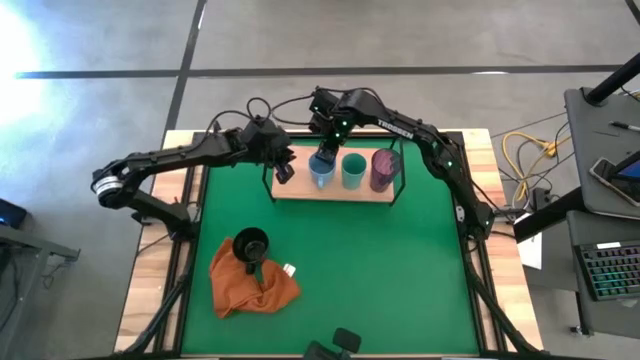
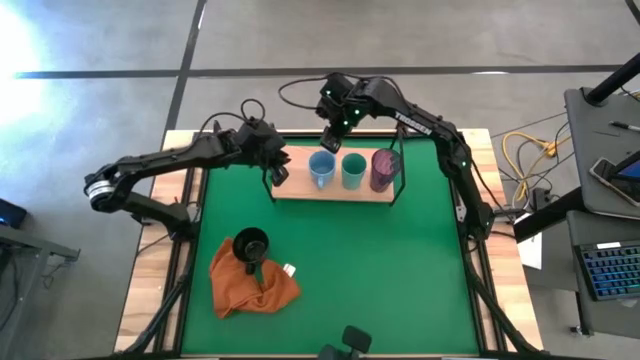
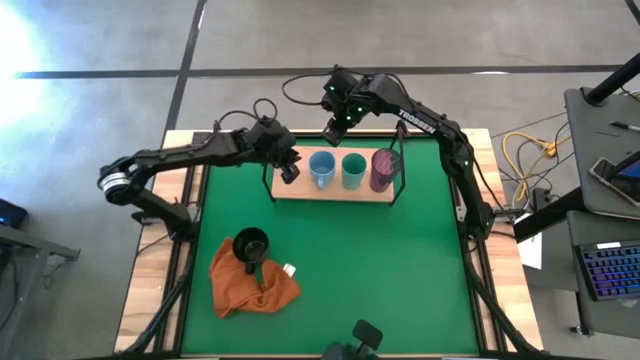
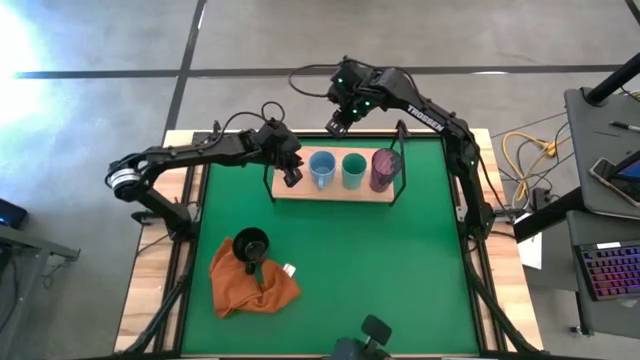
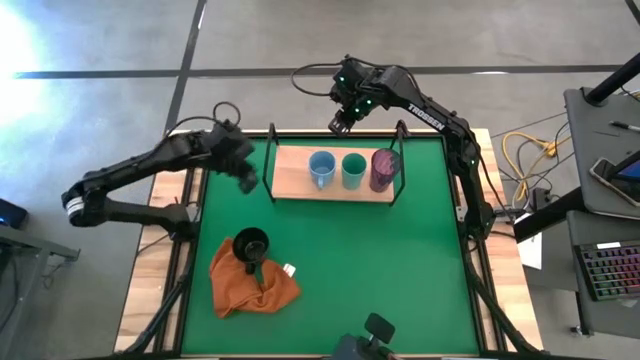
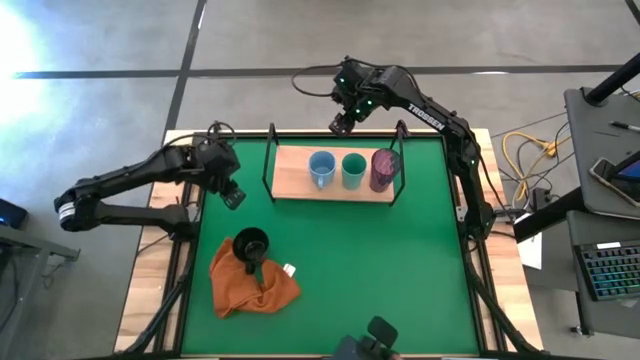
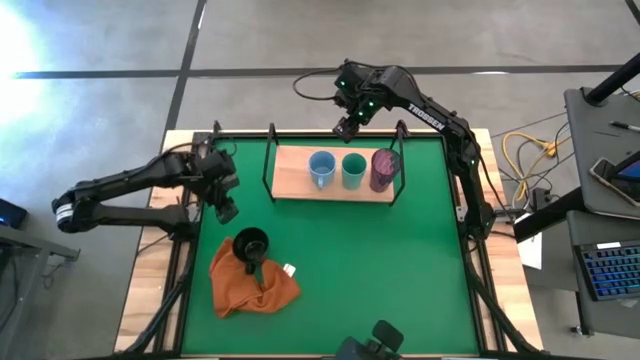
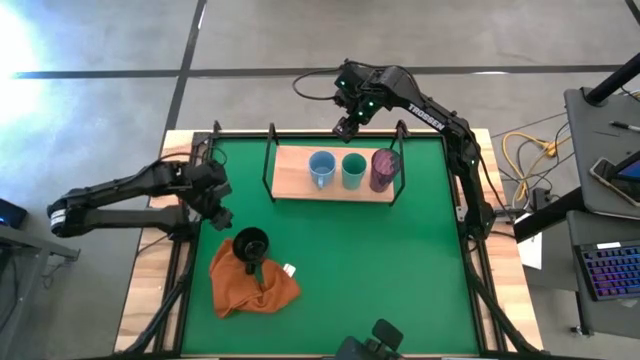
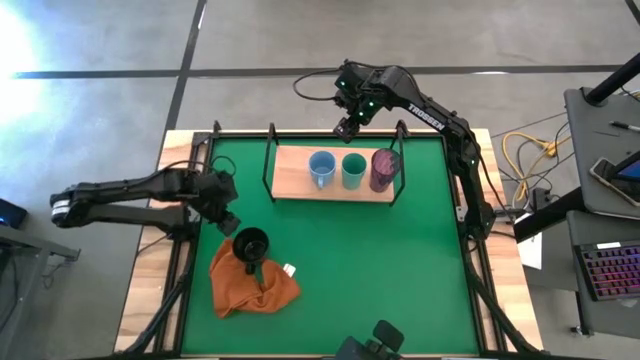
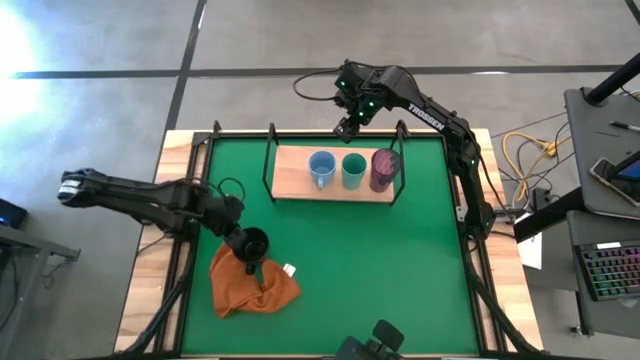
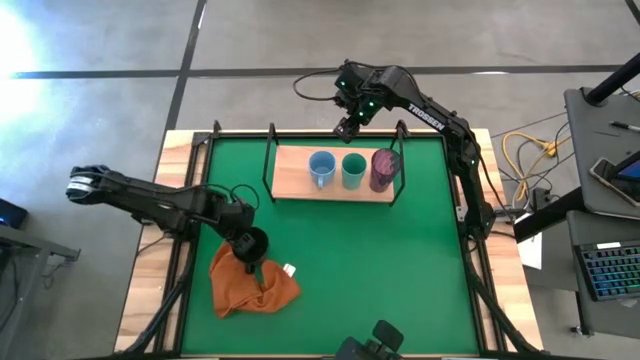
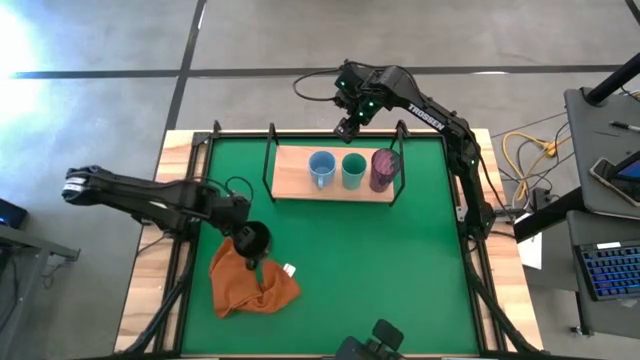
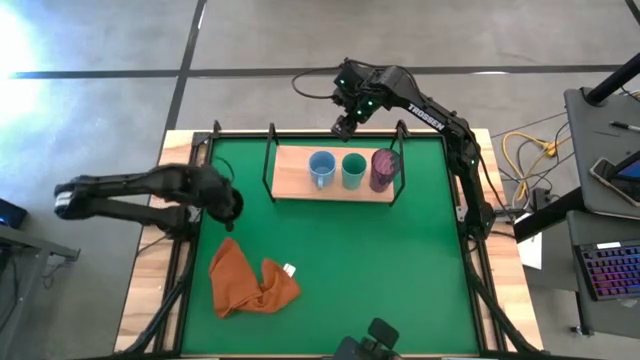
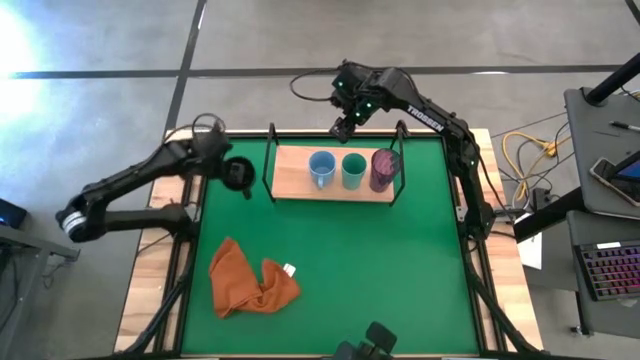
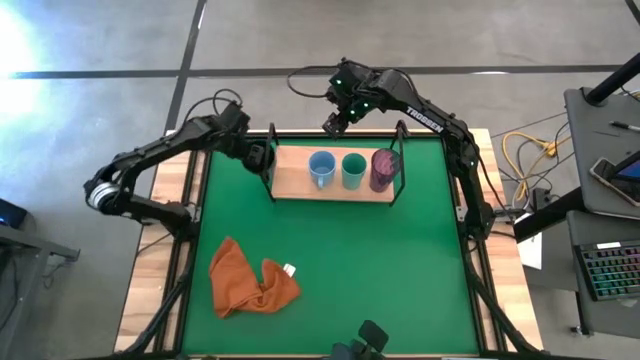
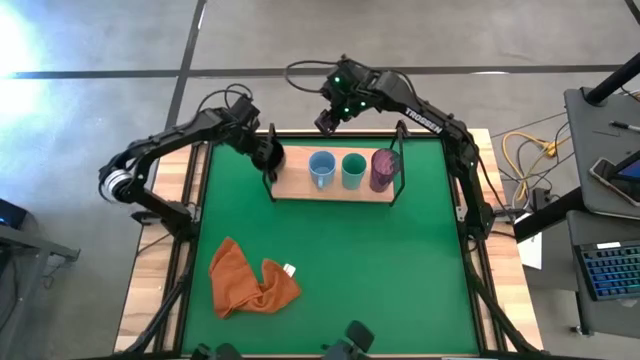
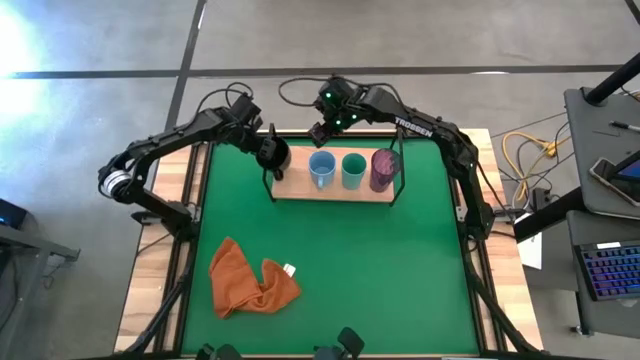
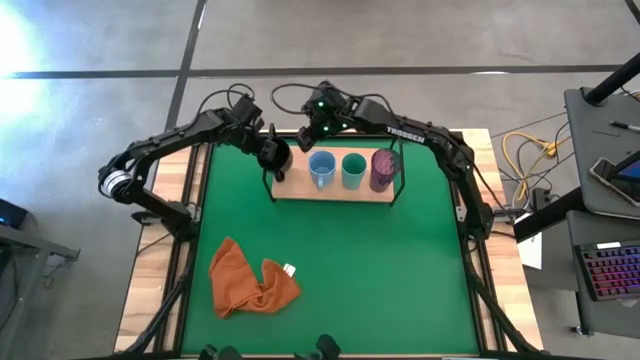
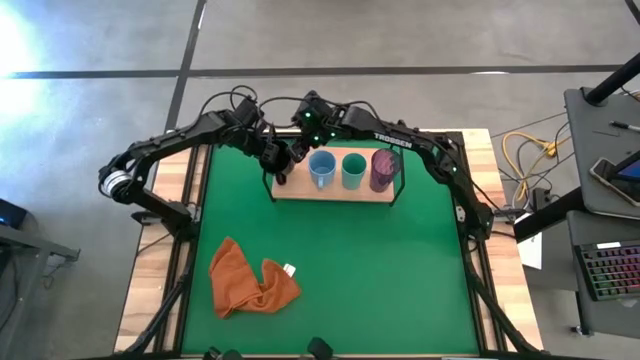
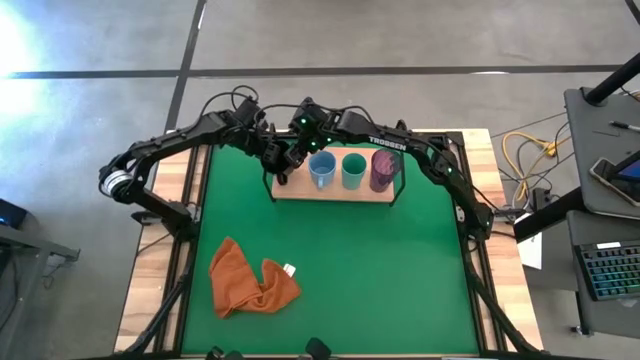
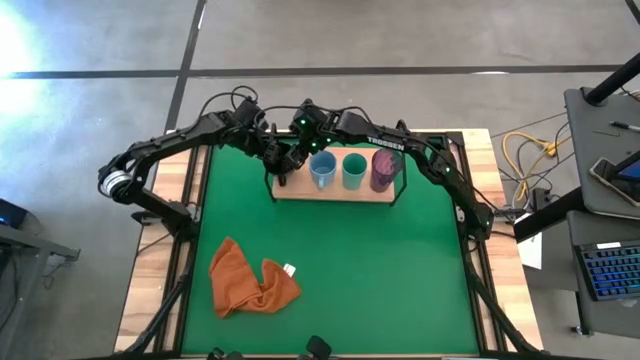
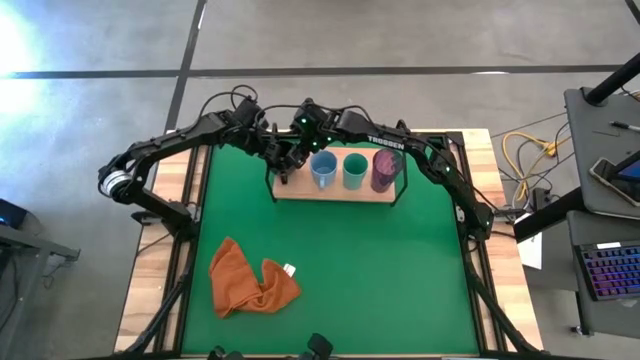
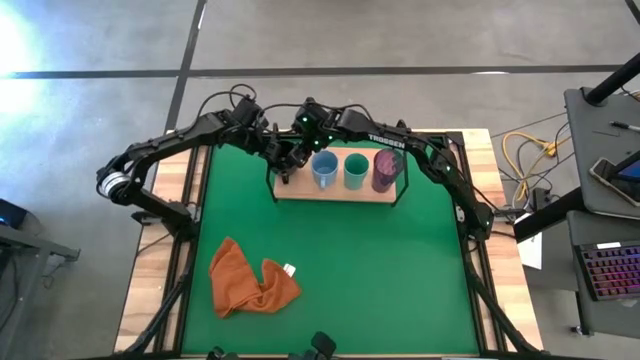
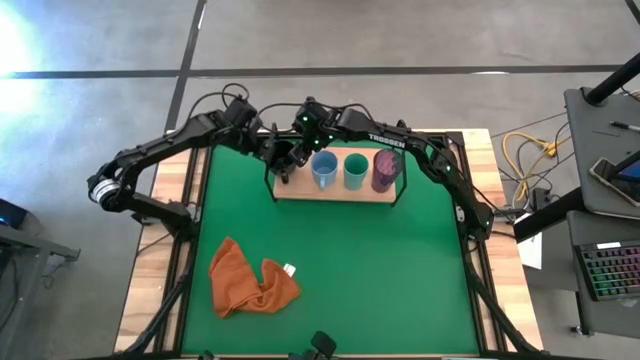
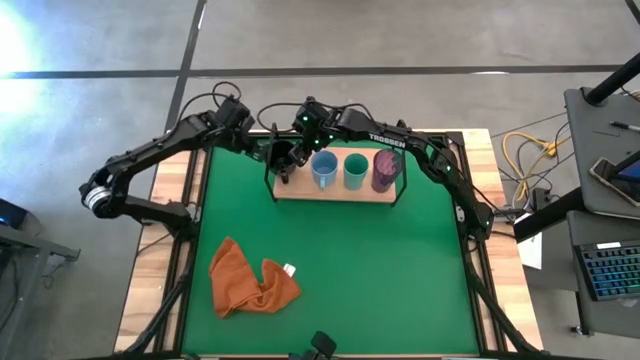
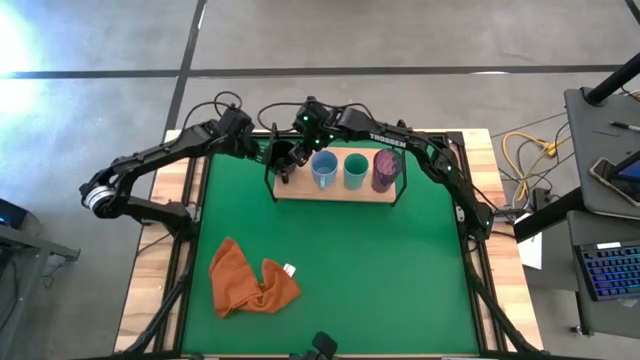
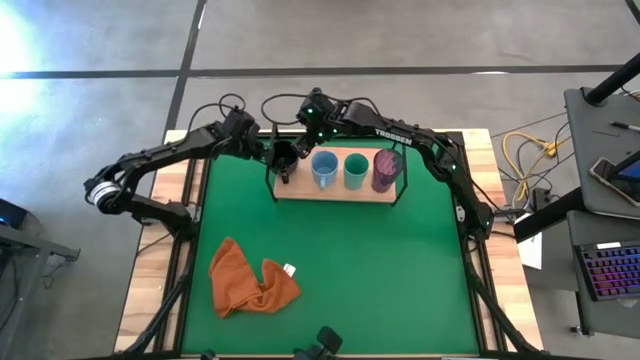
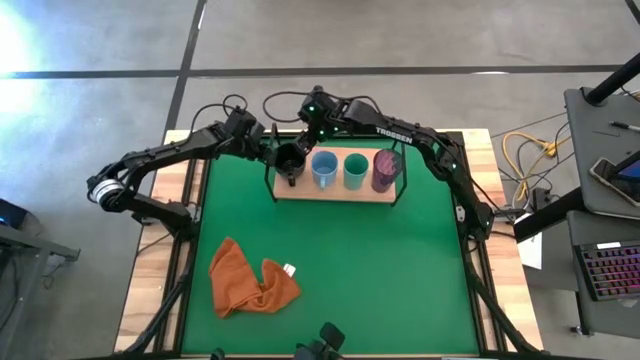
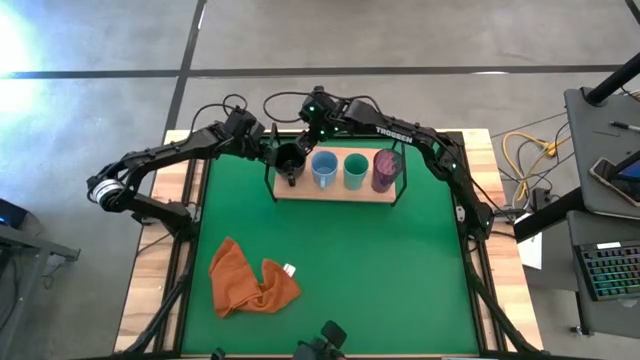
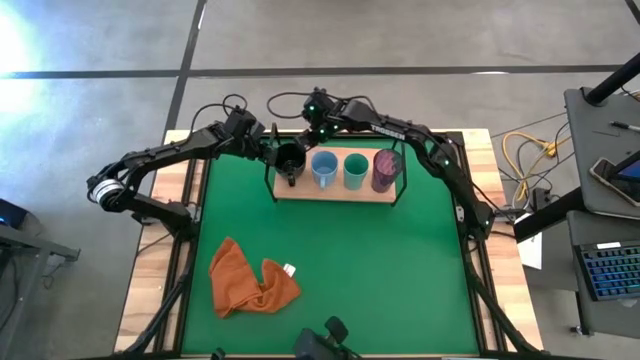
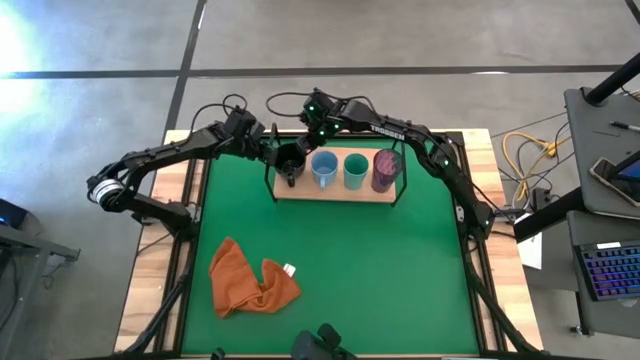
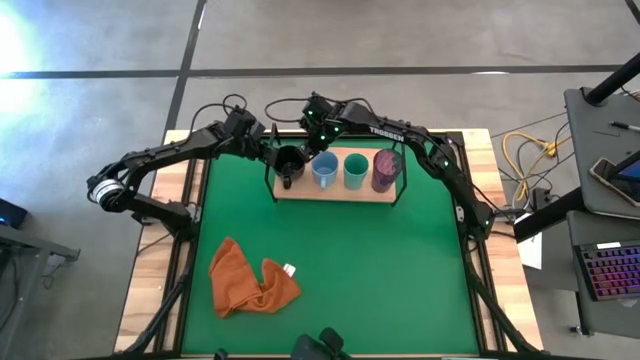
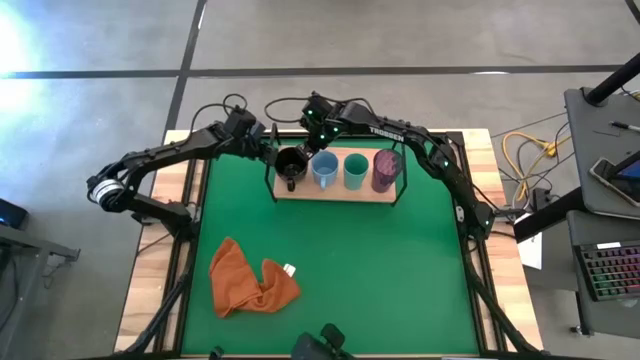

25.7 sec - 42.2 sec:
Task: Stack small to large cups/mugs on shelf
Put the black mug on the shelf

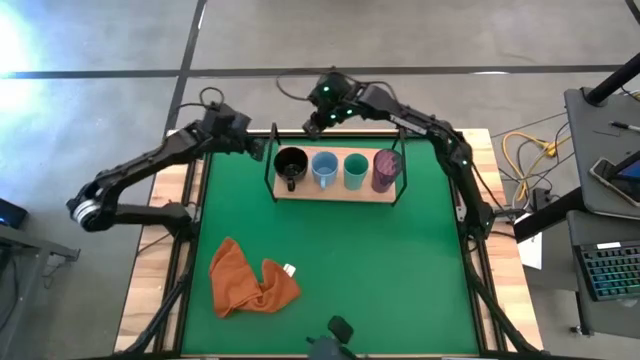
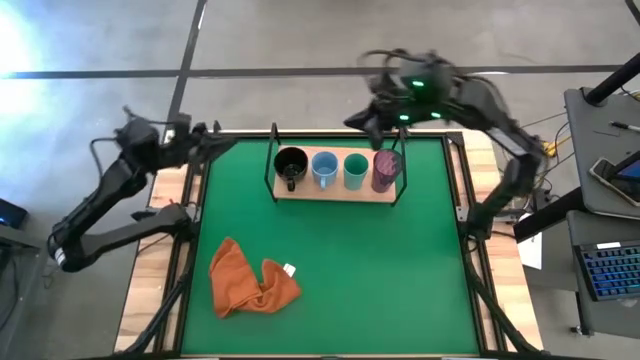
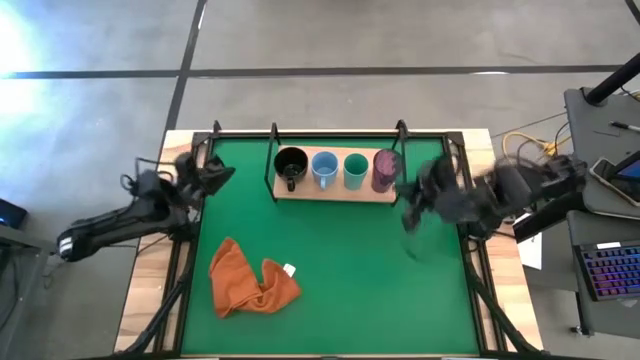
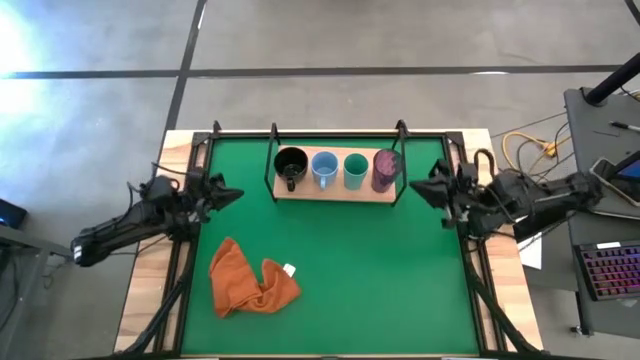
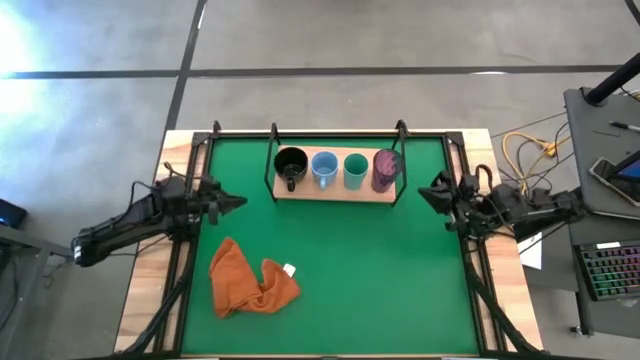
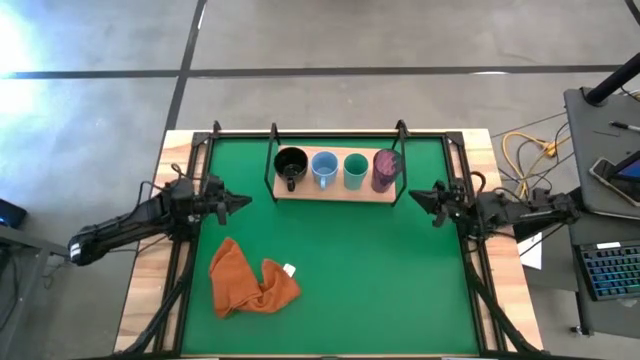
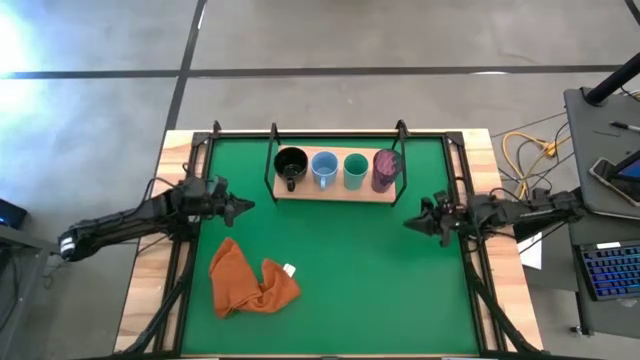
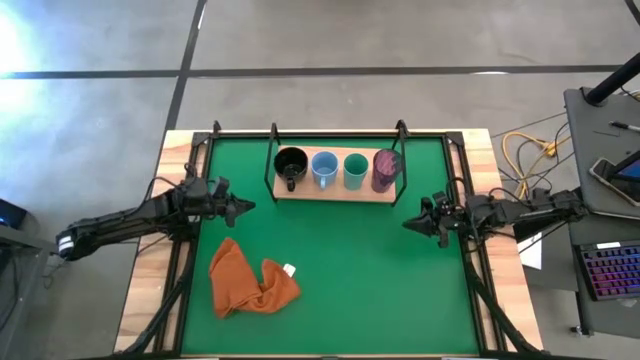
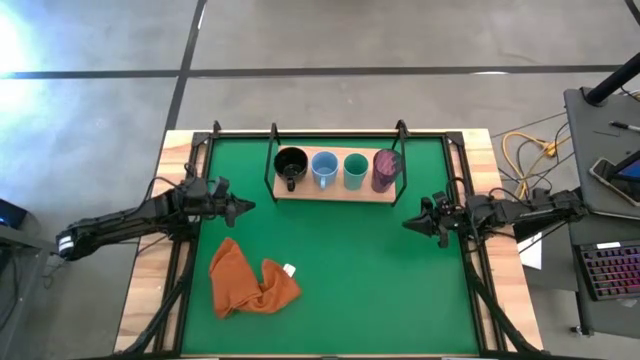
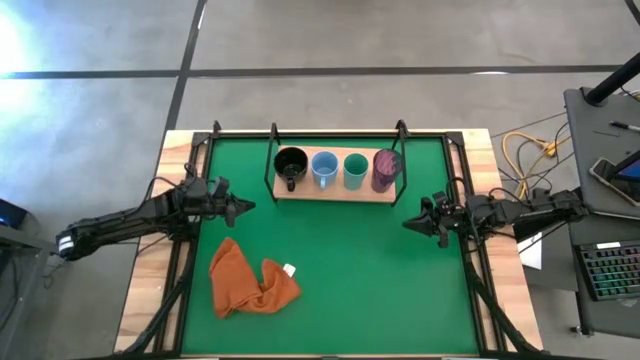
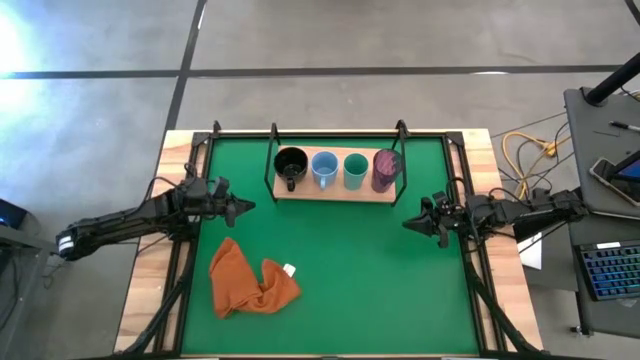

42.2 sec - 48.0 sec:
Return to Home Position
